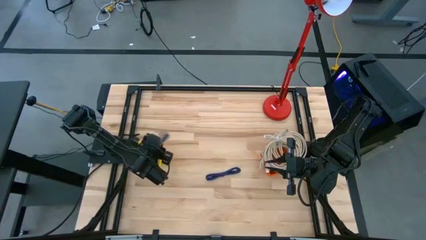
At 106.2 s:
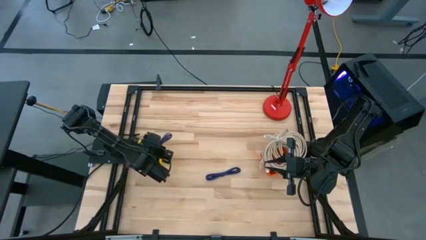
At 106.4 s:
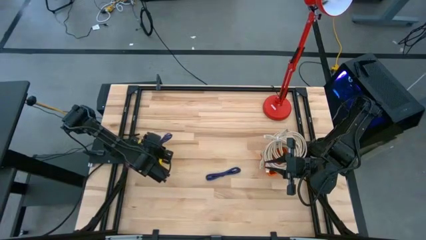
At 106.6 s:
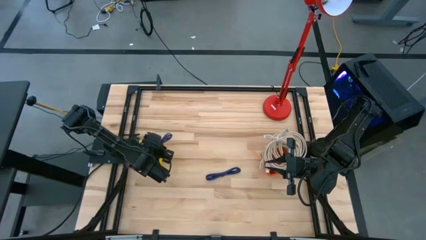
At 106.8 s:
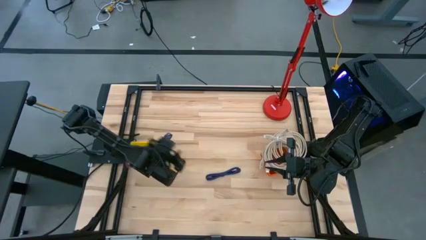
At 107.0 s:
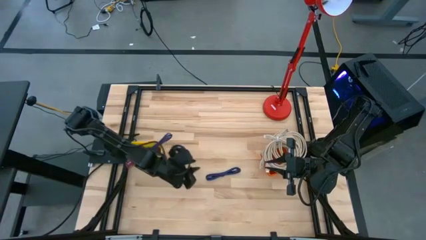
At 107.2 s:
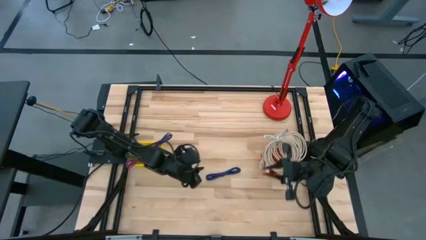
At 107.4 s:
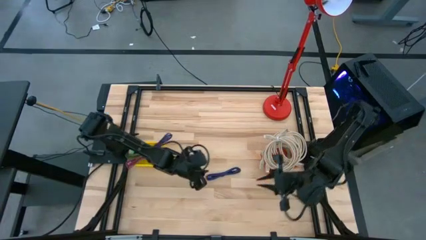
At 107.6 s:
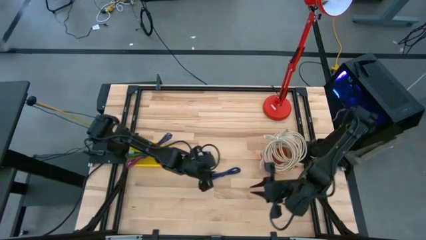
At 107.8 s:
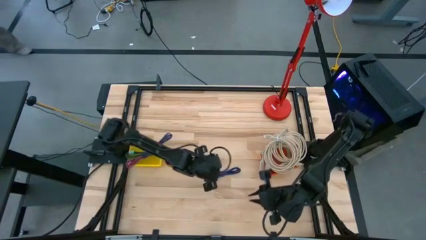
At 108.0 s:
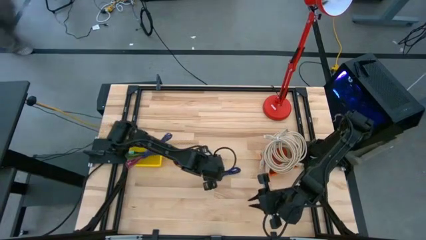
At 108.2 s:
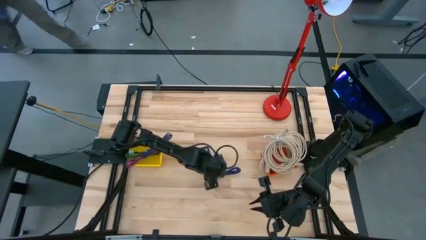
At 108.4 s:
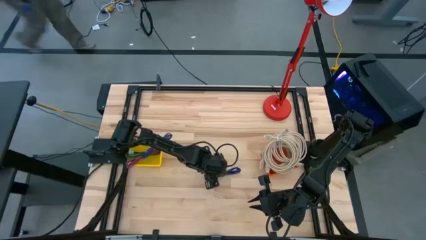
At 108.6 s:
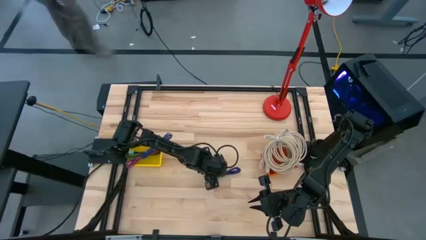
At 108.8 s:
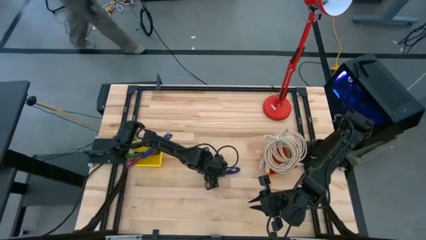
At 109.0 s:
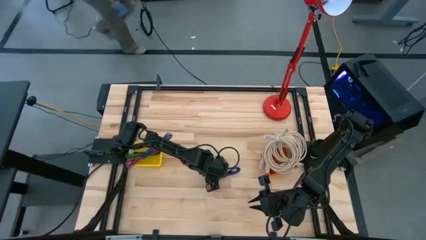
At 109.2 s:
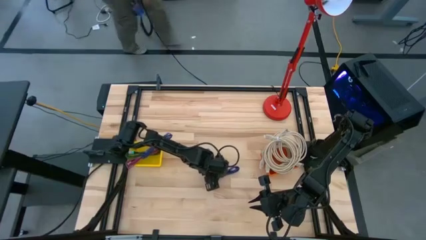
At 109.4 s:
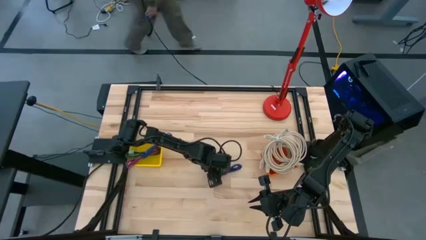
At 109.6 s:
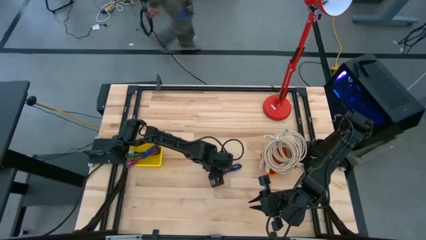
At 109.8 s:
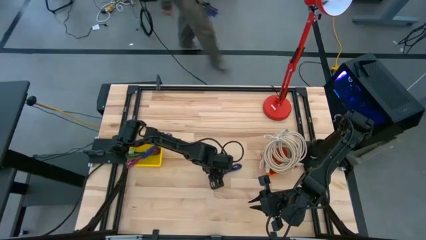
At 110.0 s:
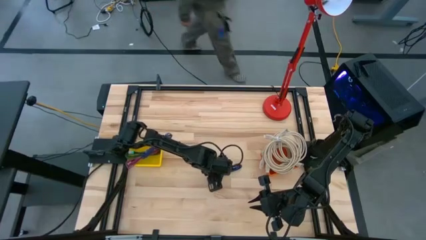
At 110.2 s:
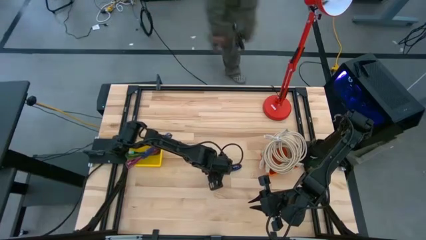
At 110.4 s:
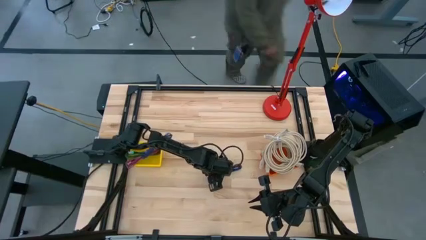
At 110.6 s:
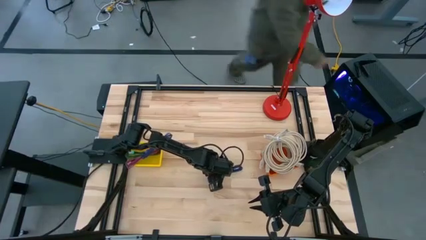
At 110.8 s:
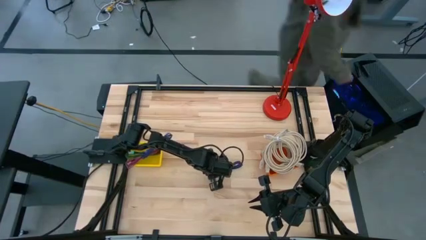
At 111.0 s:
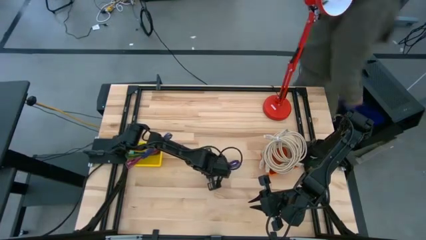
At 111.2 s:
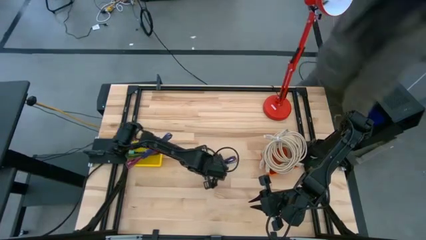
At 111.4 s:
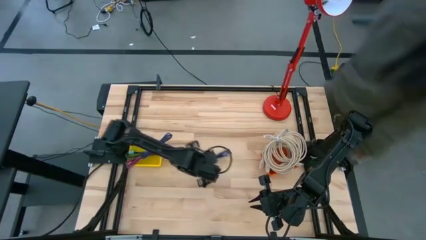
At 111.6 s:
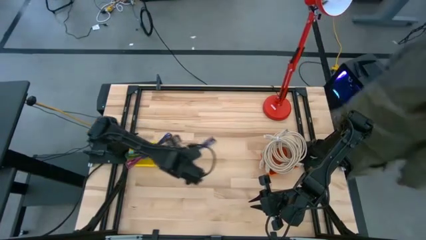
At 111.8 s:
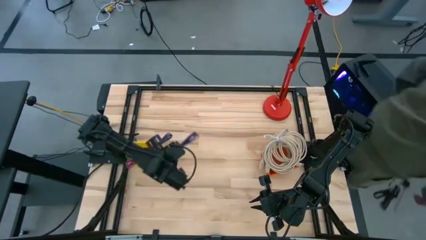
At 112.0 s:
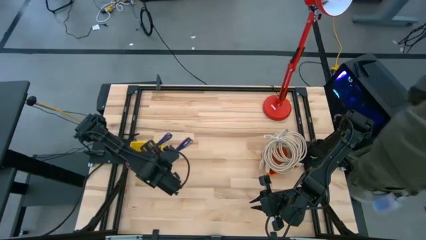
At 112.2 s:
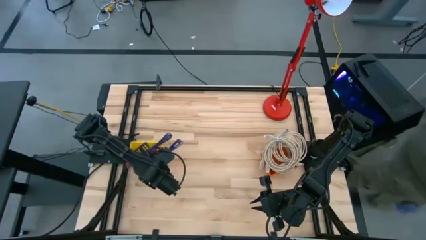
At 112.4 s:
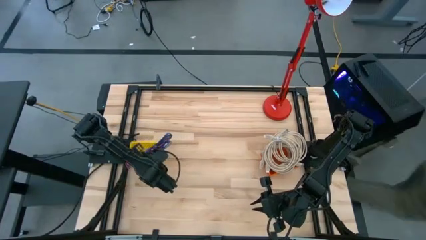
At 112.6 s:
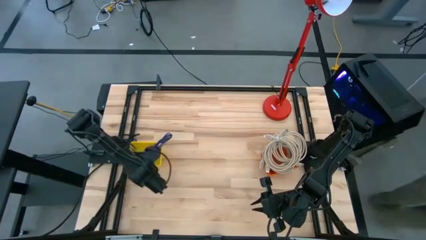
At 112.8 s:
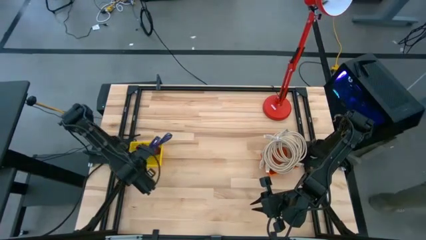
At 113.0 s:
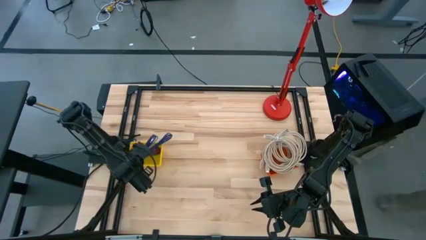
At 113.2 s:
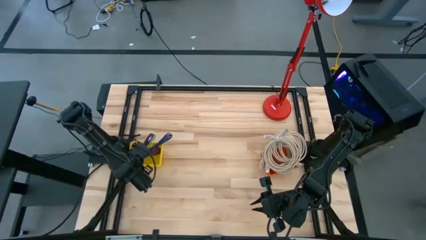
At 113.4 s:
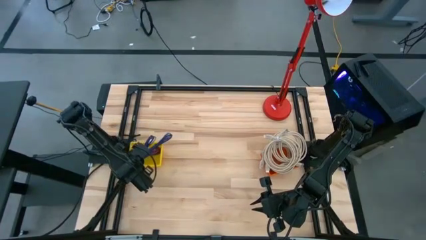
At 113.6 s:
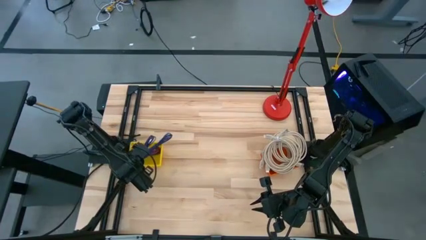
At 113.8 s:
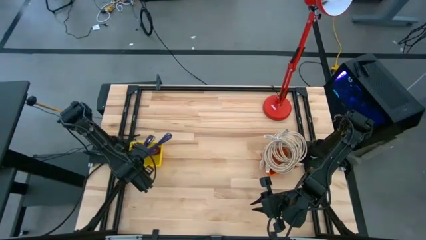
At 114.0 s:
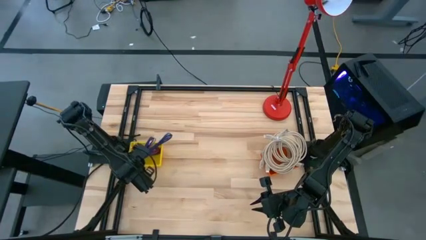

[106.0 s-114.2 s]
Task: Pick & Place USB Port
Put the black and purple charger cable into the yellow bin

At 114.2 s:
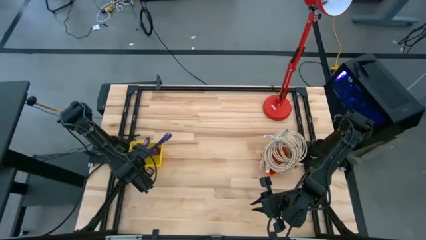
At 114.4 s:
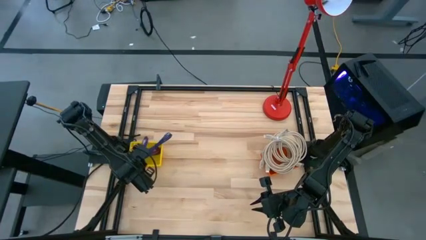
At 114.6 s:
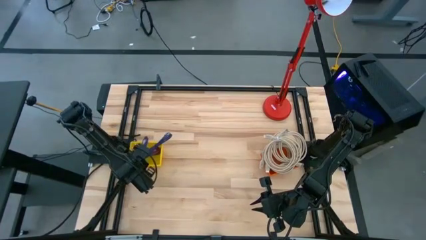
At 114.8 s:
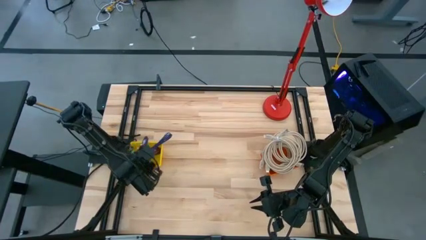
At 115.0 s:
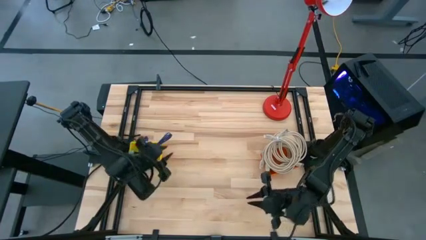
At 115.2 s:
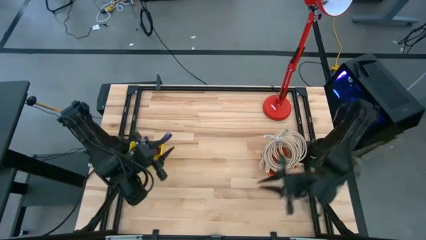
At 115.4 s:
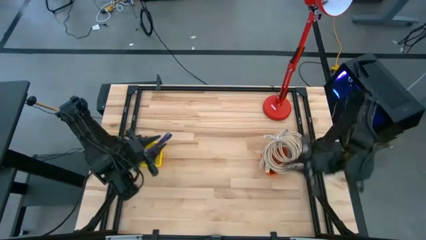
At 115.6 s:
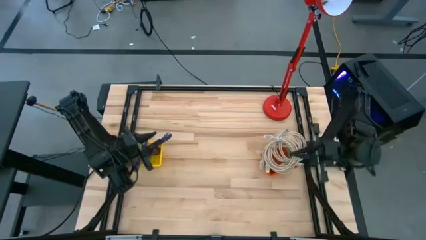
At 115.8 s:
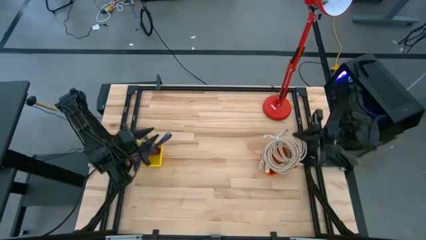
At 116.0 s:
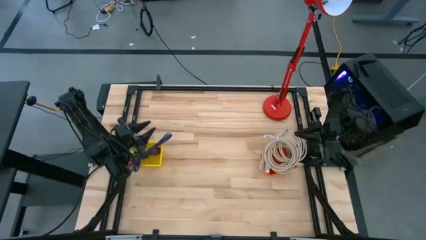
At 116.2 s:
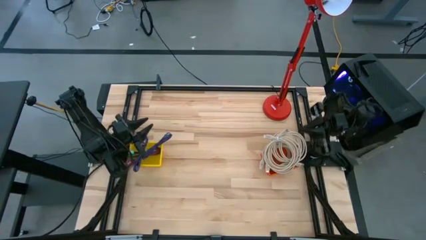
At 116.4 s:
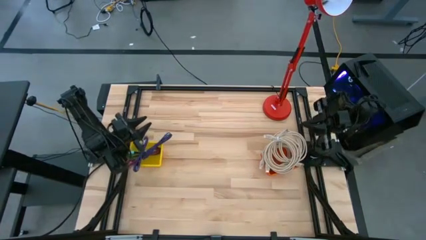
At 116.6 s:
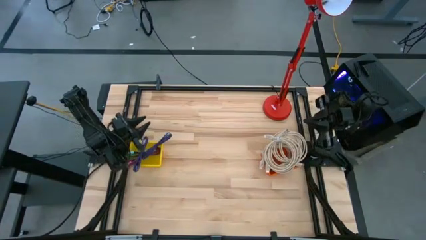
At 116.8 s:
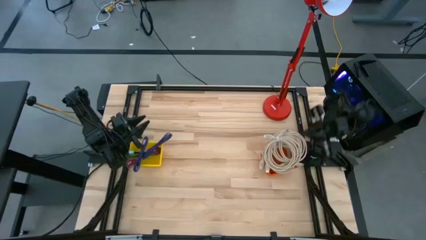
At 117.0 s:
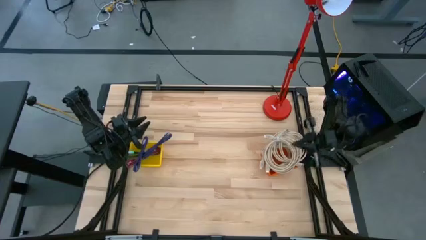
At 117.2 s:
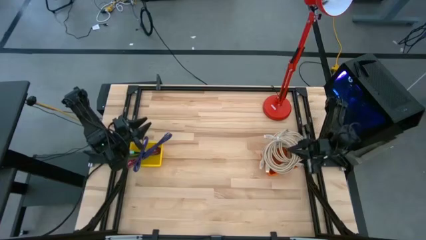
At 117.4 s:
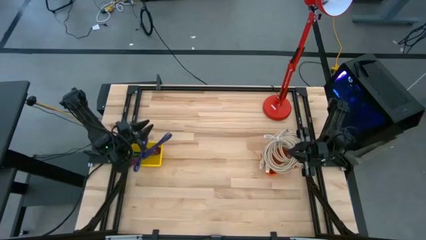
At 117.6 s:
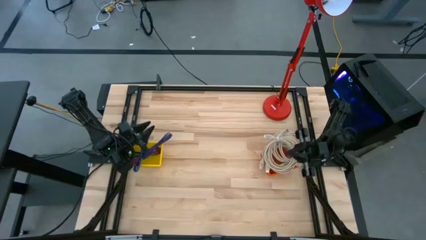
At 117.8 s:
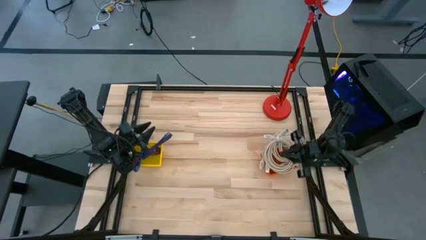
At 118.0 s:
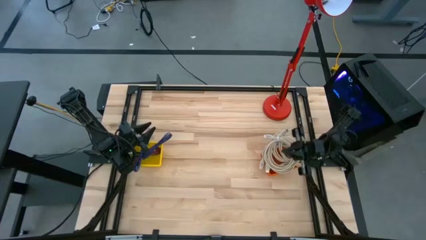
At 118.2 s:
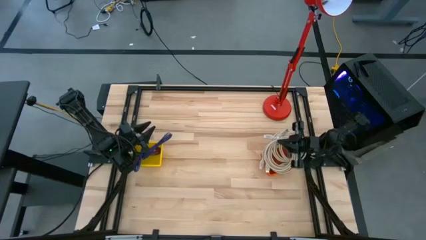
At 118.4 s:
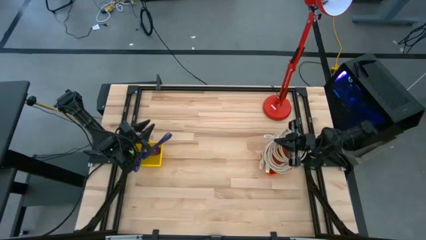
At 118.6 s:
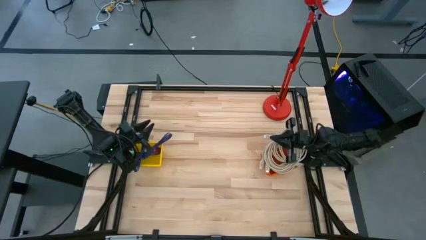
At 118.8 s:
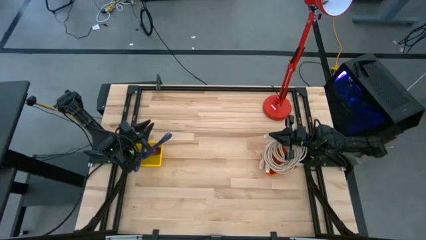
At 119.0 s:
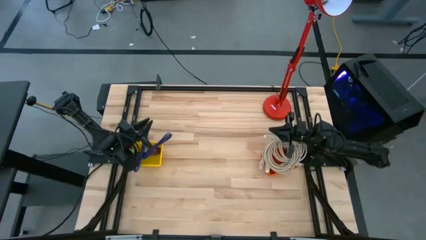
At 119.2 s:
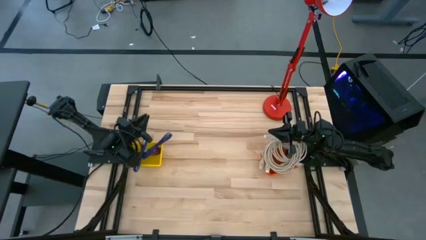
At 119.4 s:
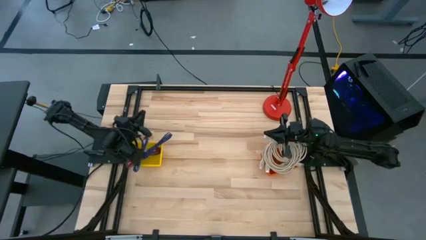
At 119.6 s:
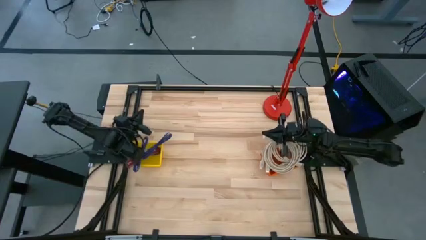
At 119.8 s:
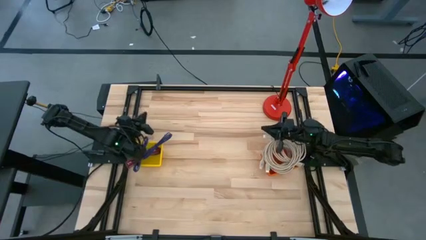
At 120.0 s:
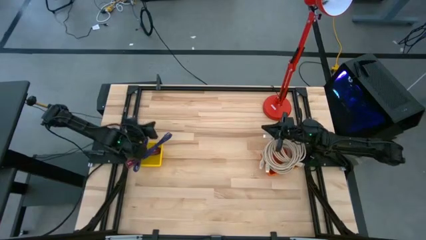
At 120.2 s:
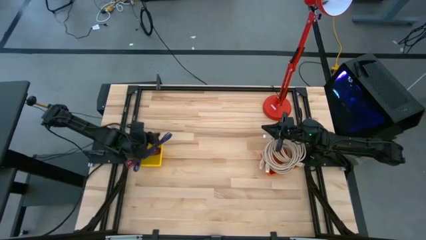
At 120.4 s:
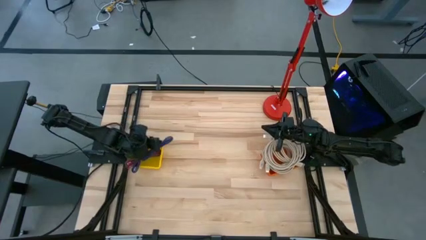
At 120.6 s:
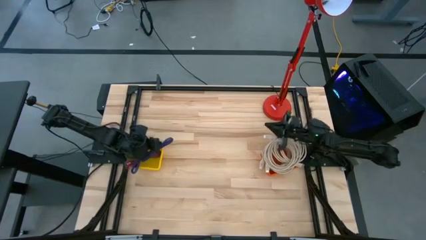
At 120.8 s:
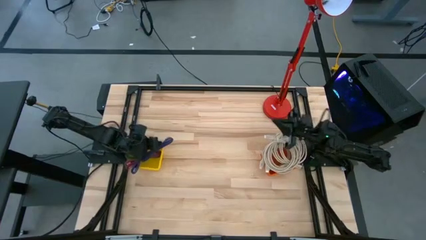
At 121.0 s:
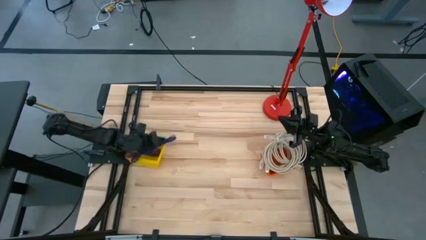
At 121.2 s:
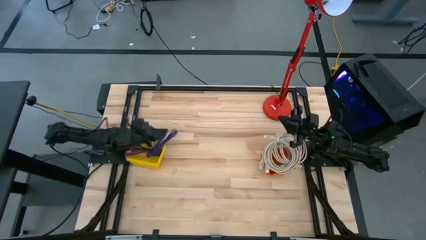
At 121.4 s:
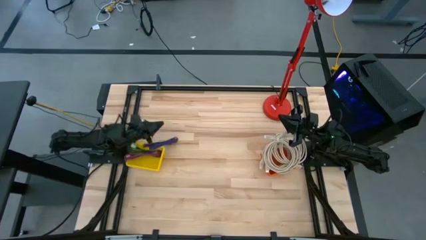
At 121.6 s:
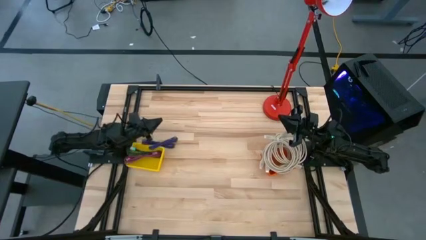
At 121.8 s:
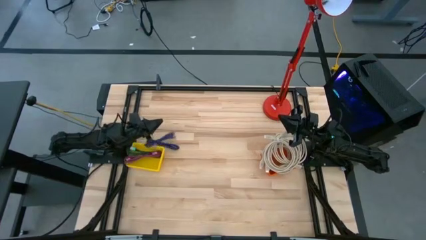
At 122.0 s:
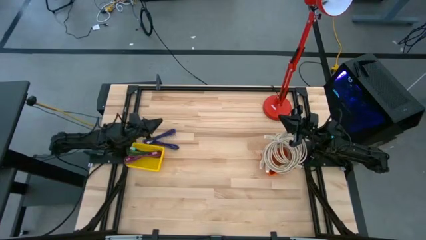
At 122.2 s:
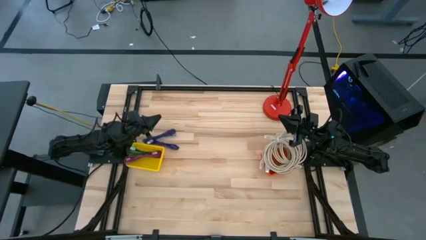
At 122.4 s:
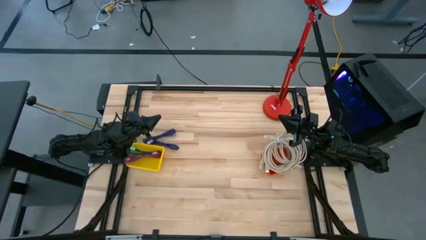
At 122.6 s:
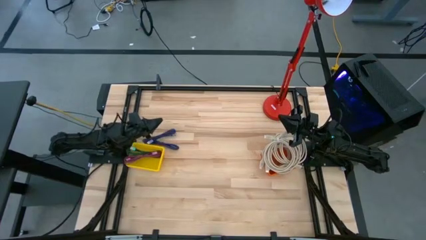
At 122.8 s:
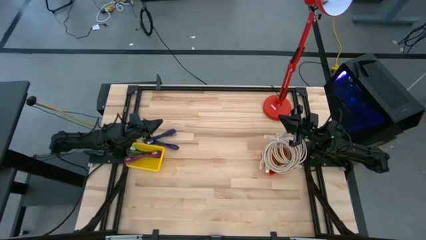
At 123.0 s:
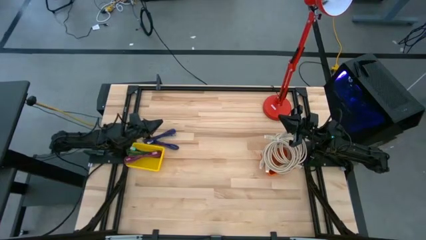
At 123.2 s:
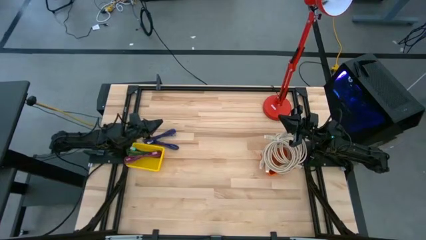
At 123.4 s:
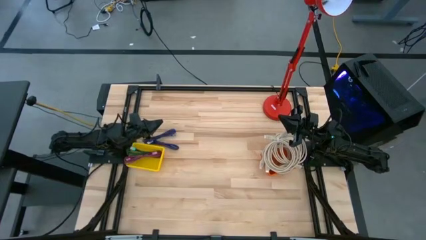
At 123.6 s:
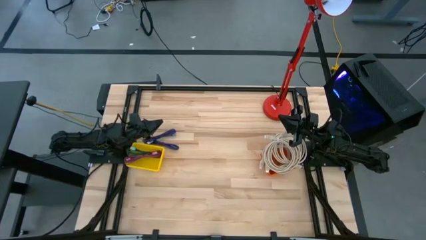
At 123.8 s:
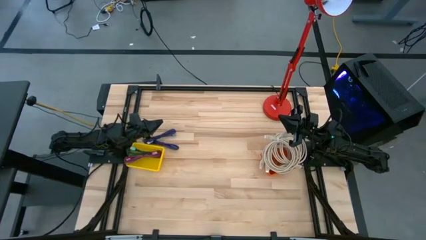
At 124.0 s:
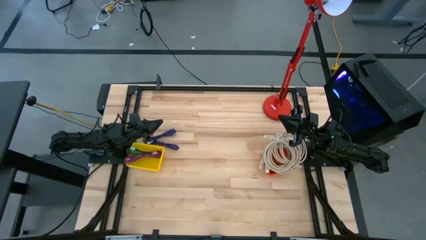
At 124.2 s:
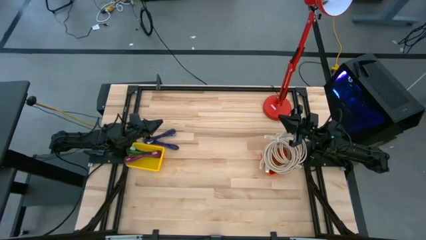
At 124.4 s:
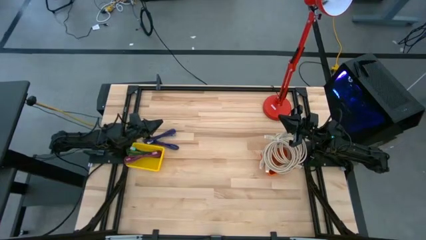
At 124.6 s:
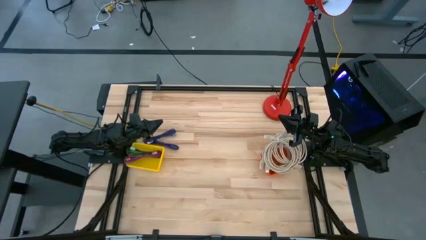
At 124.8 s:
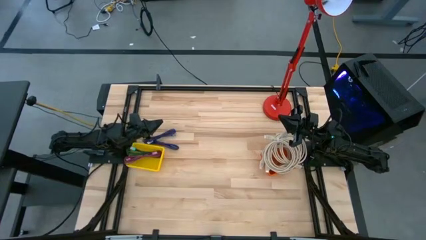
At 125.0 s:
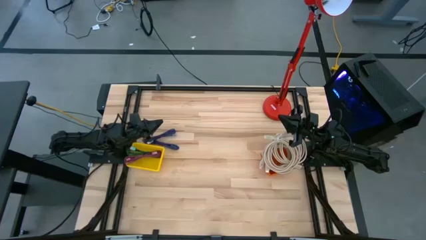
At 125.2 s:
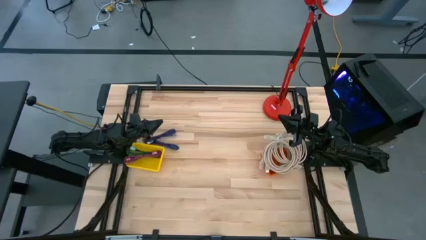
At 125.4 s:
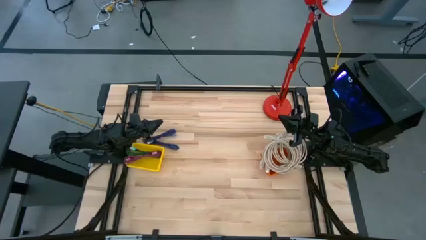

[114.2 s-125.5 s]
Return to Home Position
